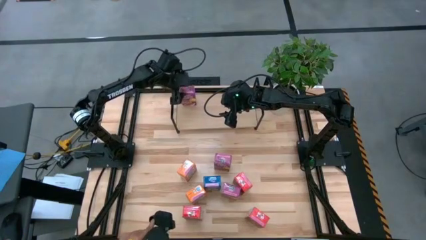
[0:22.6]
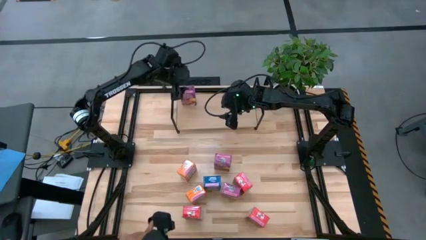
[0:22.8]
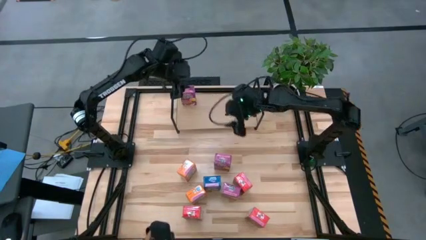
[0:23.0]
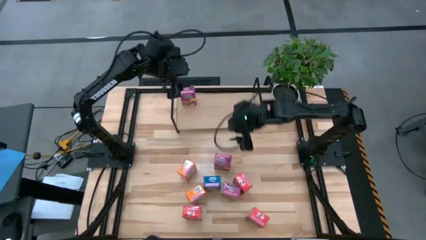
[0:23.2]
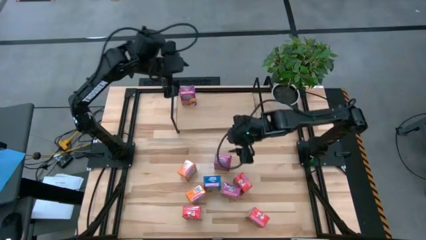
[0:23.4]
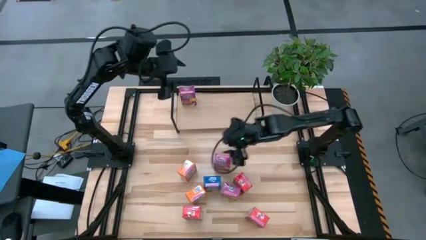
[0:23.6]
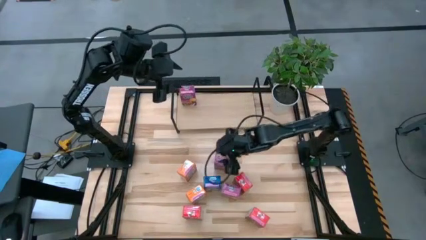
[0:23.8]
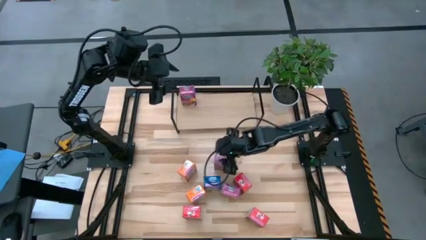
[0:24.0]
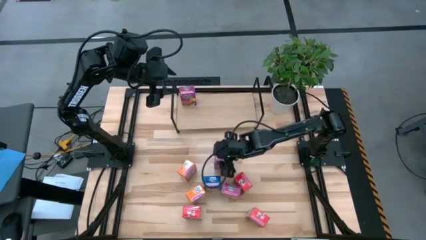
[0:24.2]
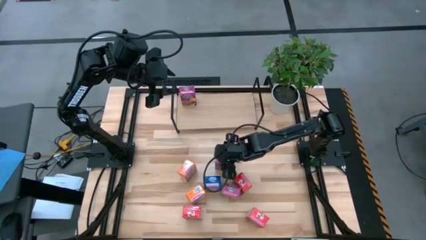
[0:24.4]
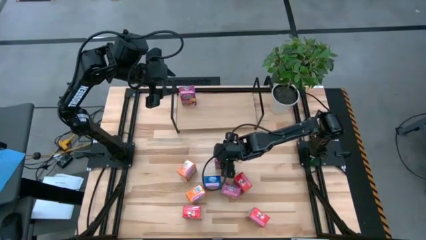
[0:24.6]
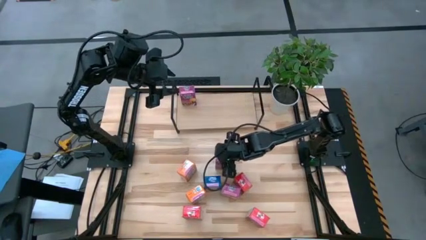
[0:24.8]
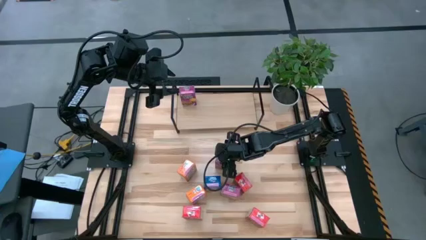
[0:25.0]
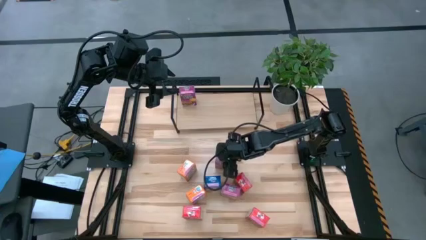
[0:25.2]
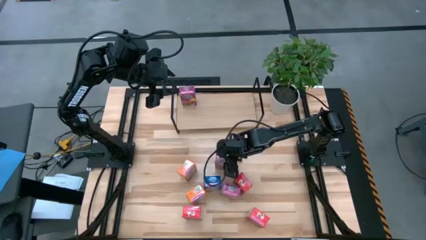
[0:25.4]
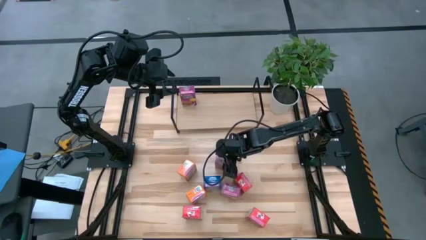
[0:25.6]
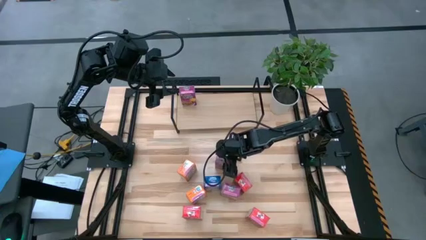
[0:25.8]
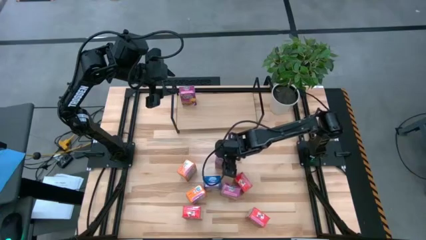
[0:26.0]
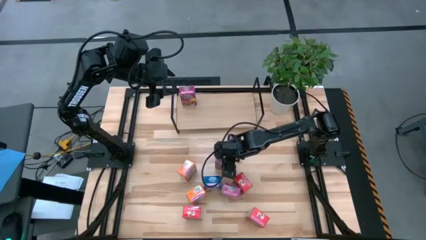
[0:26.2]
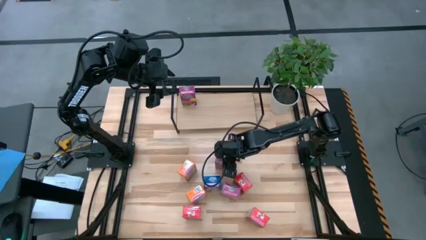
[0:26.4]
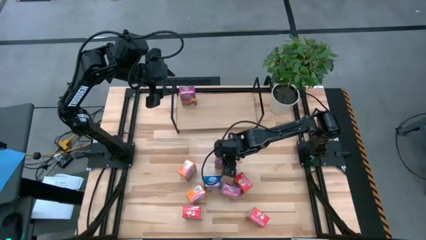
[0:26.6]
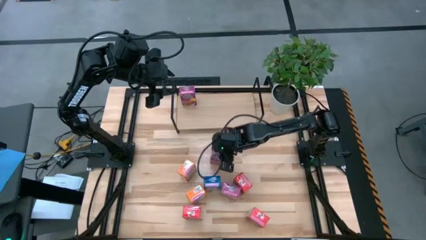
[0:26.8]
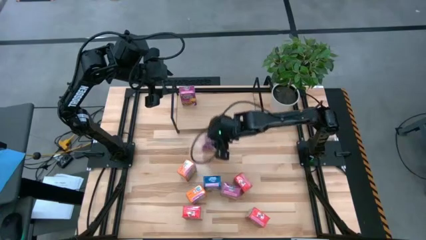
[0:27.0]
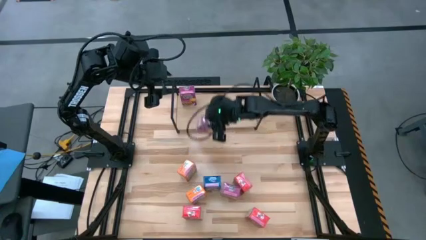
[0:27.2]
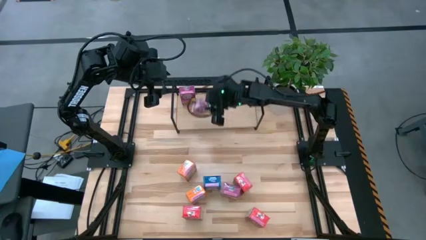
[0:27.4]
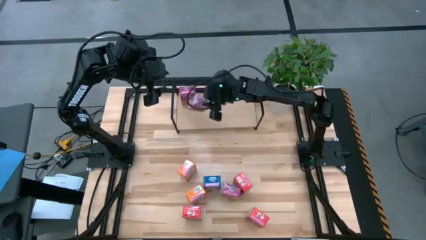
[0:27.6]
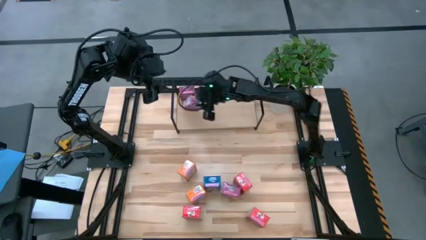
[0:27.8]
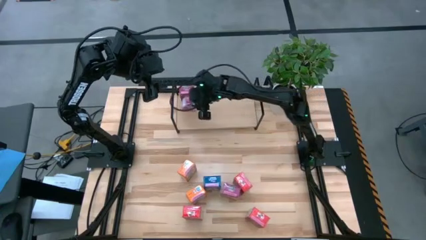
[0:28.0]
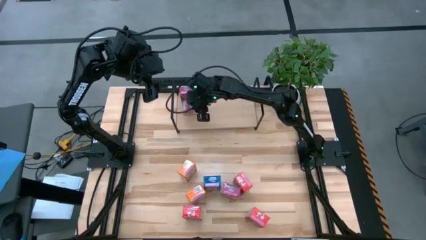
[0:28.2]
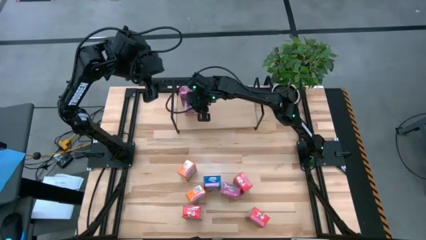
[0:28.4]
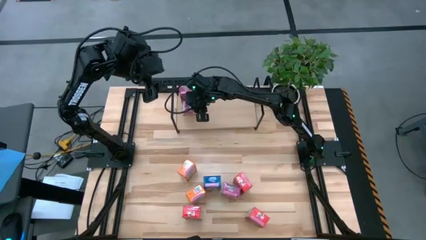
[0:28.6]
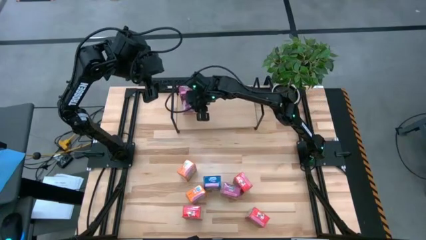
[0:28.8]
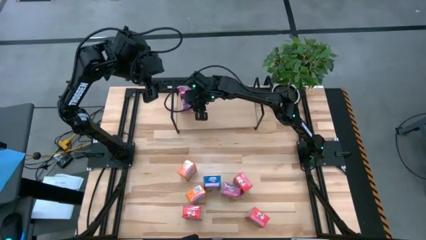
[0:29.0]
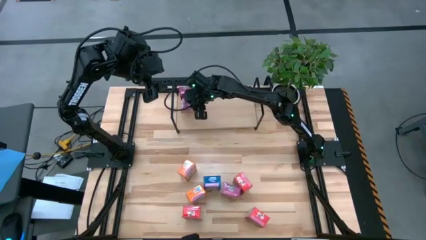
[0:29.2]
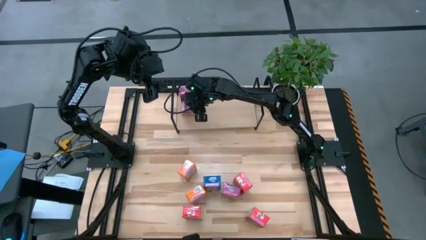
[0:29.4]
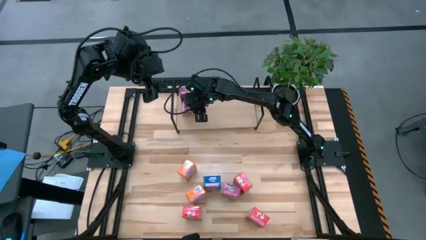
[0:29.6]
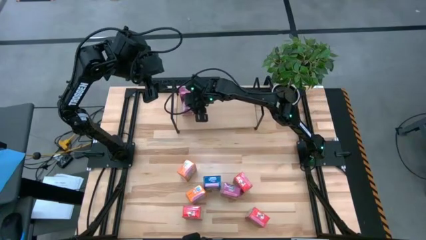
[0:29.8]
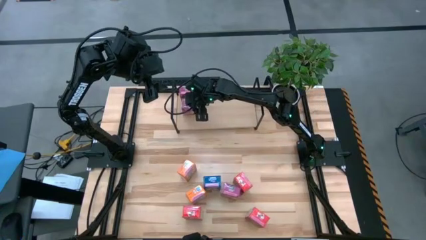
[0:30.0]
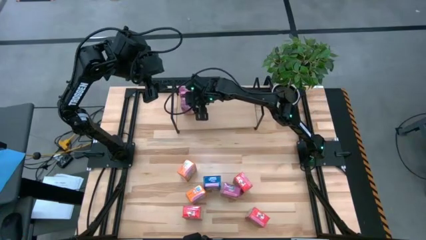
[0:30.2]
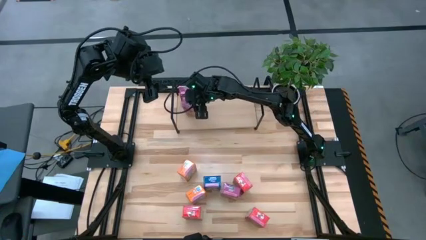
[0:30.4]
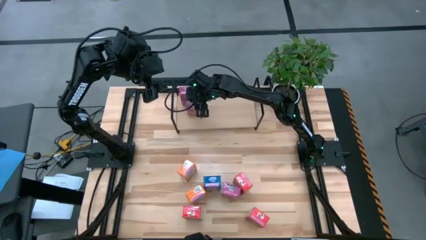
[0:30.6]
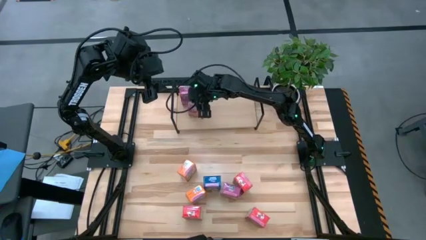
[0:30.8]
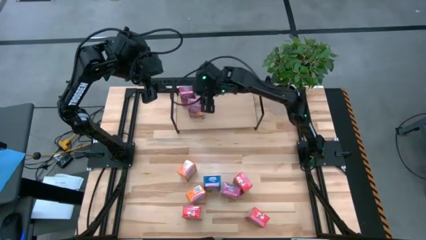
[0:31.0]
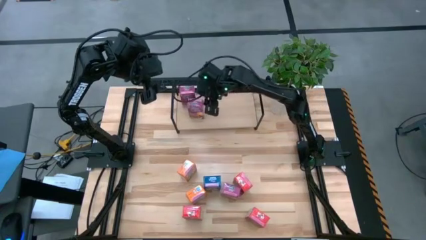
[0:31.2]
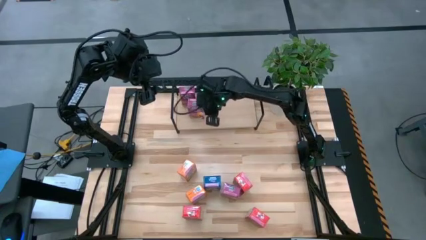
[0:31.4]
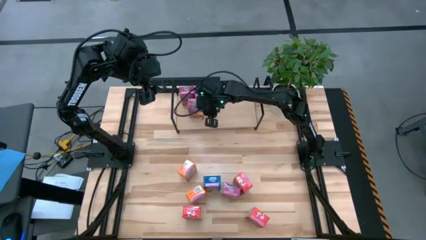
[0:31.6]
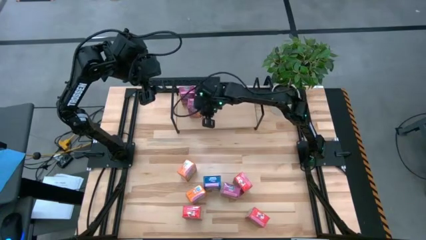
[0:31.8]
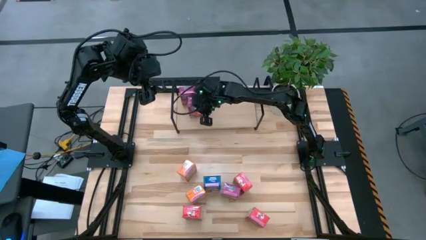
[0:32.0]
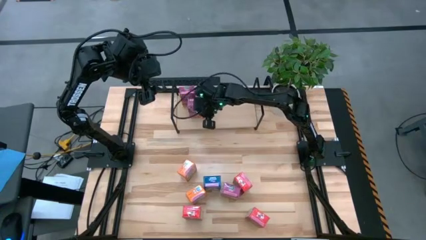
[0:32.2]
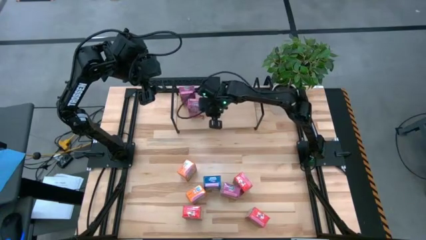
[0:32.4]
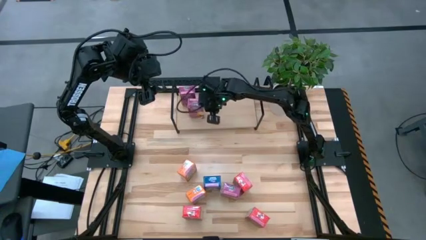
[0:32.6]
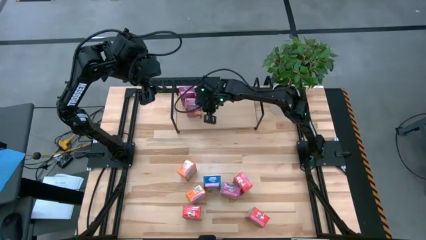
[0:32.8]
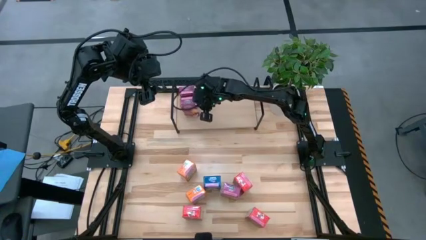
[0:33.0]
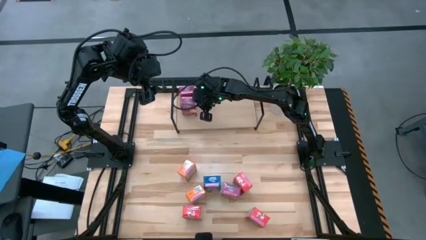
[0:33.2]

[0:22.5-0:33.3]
Task: Stack cereal on shelf
Put the top purple cereal box on the shelf aligned with the other purple cereal box
